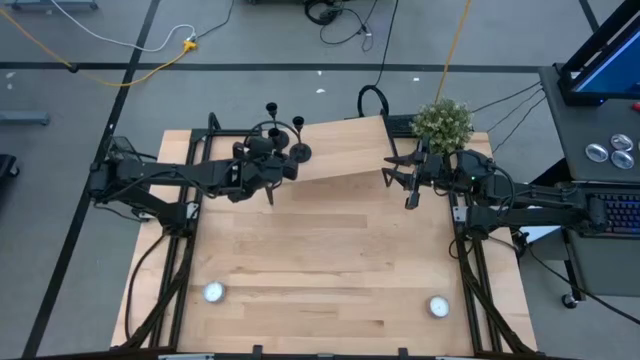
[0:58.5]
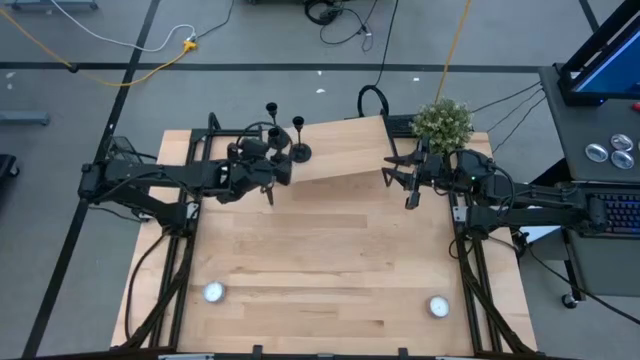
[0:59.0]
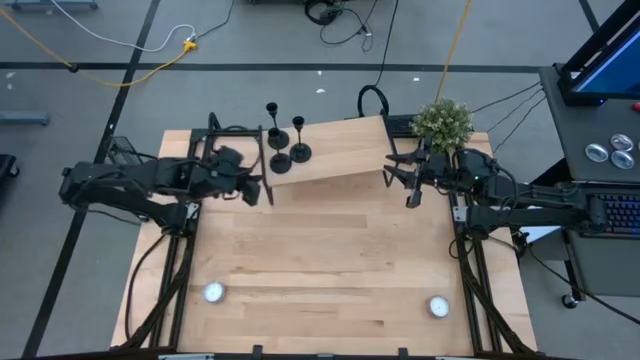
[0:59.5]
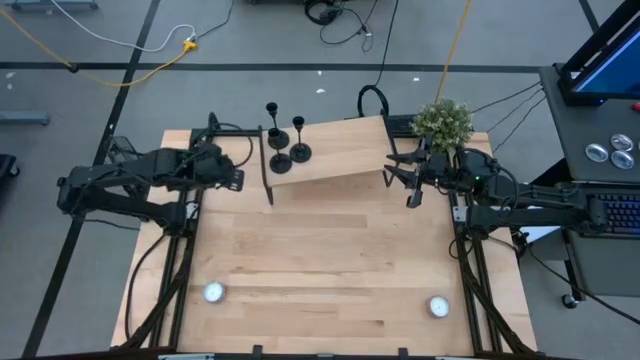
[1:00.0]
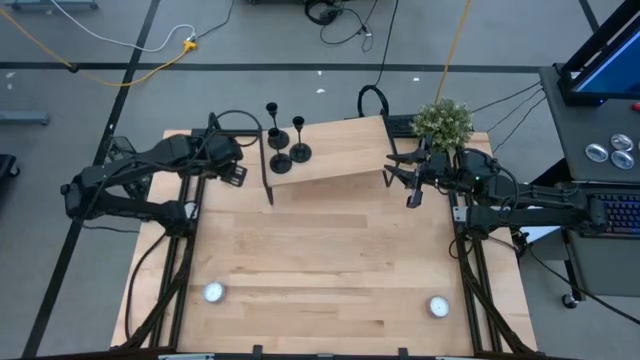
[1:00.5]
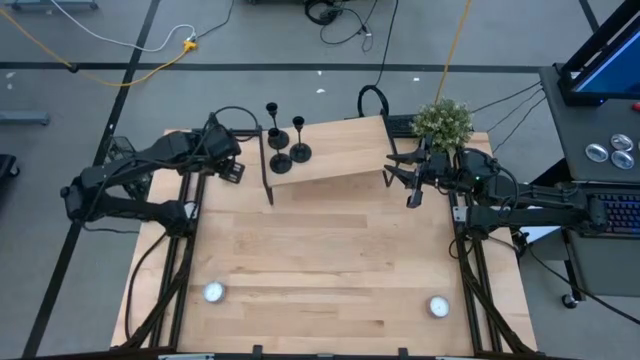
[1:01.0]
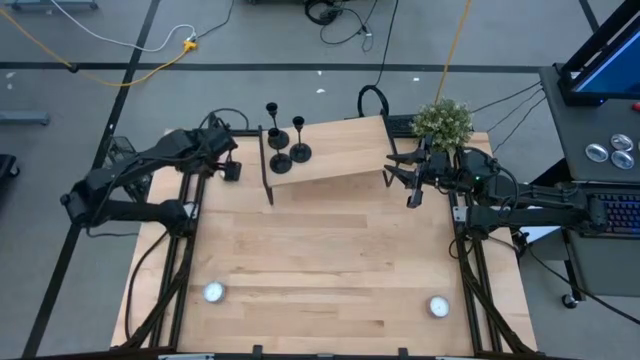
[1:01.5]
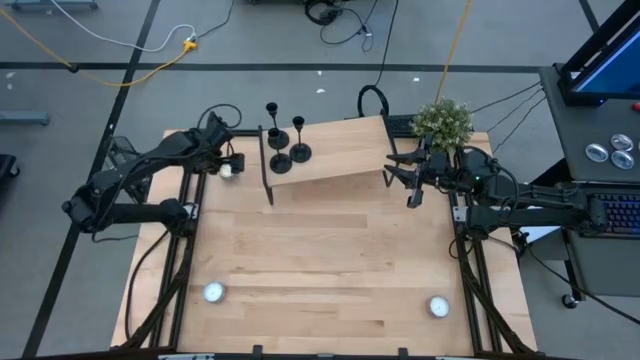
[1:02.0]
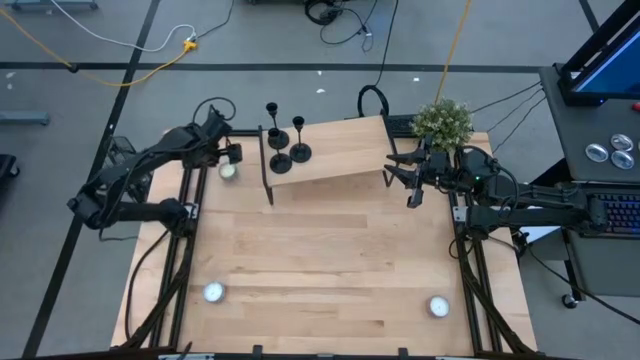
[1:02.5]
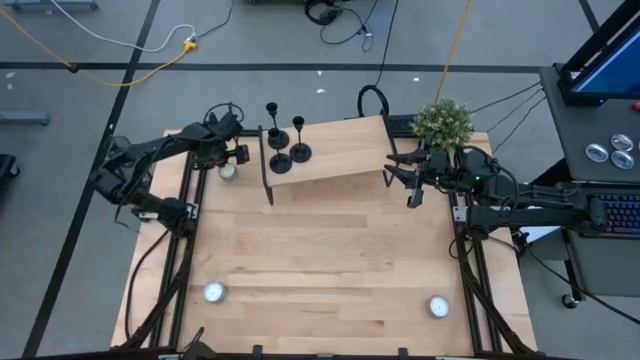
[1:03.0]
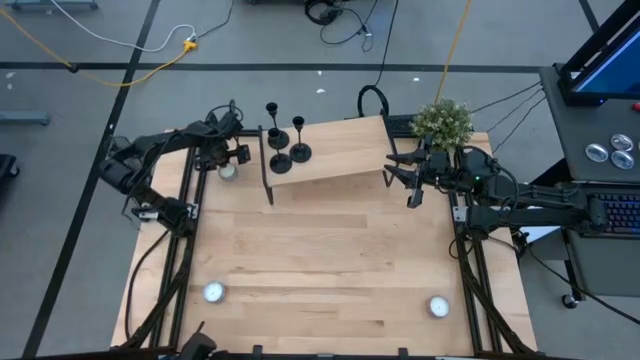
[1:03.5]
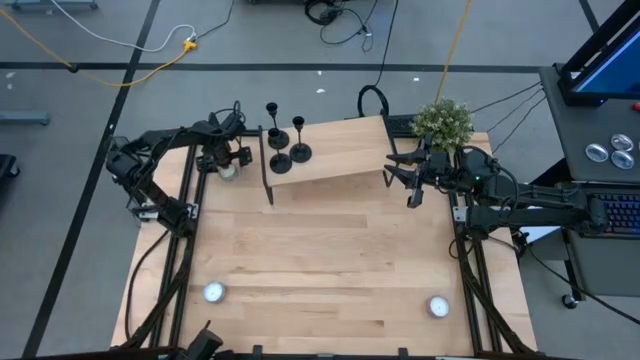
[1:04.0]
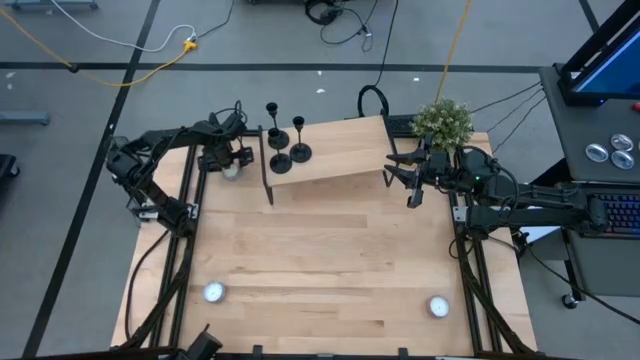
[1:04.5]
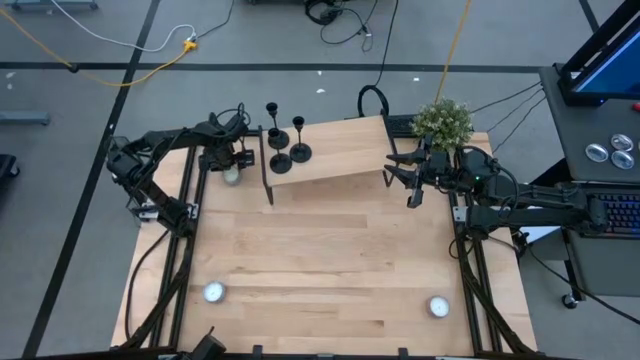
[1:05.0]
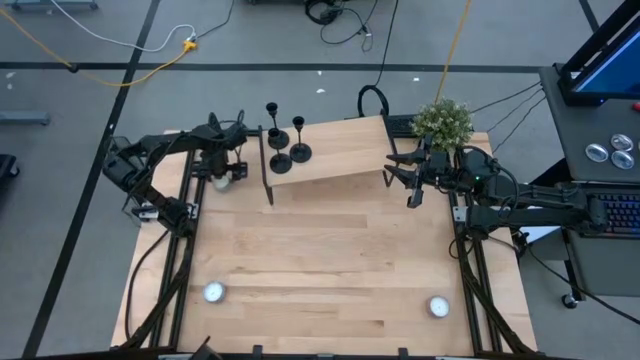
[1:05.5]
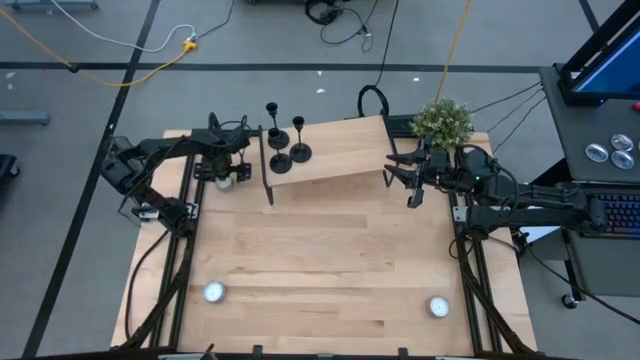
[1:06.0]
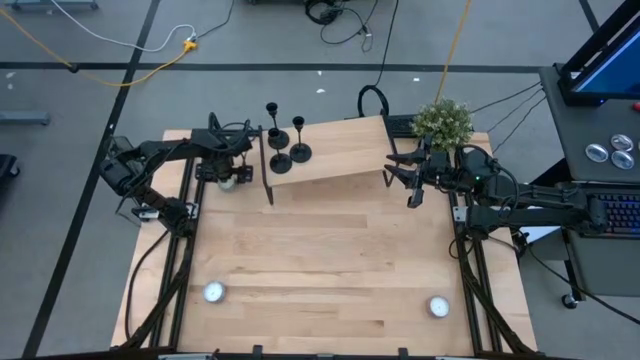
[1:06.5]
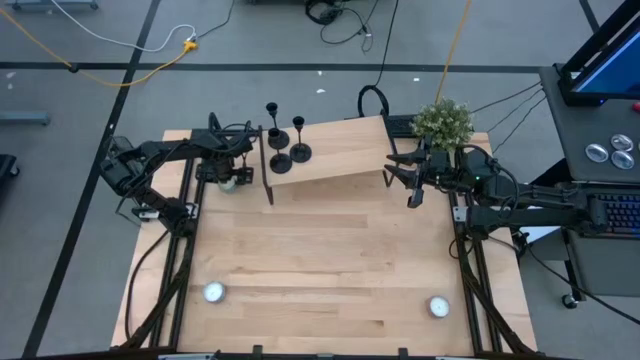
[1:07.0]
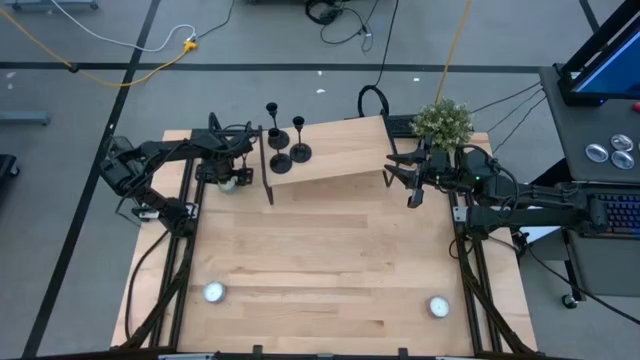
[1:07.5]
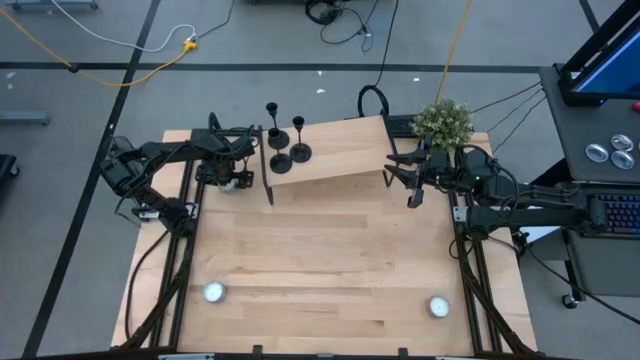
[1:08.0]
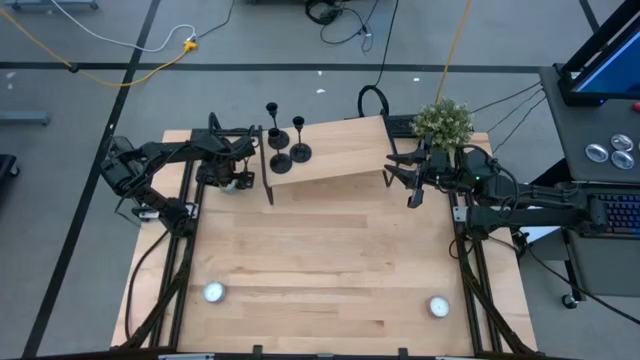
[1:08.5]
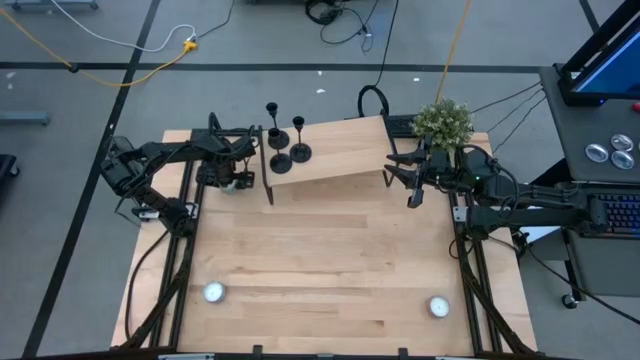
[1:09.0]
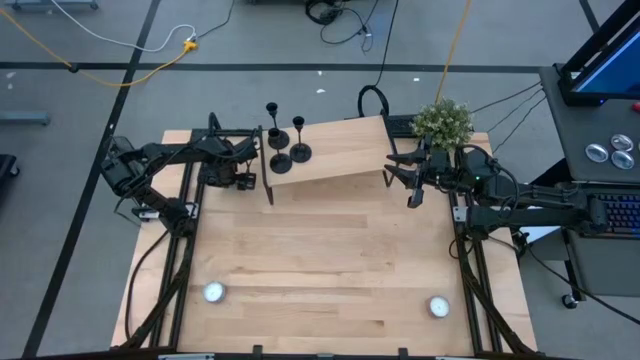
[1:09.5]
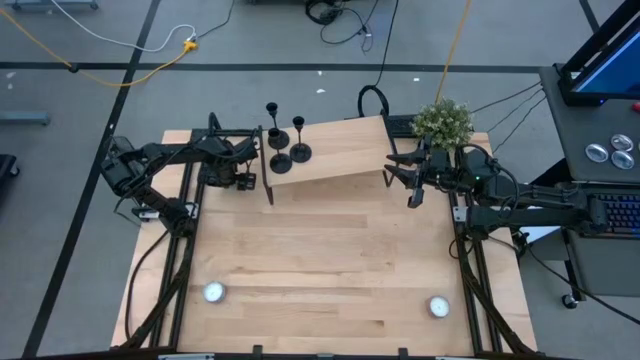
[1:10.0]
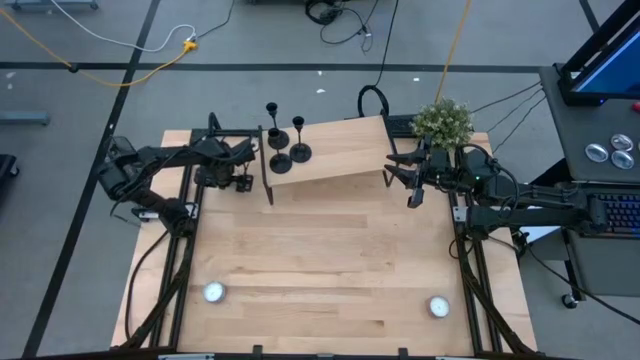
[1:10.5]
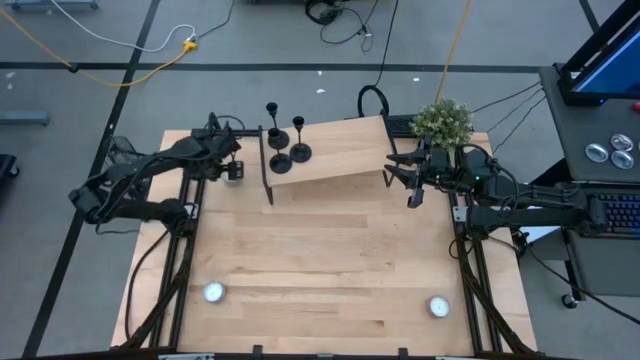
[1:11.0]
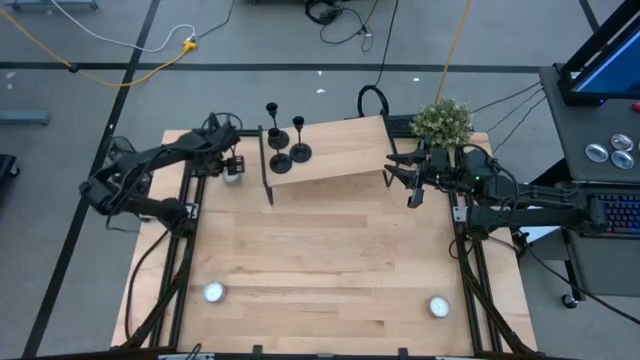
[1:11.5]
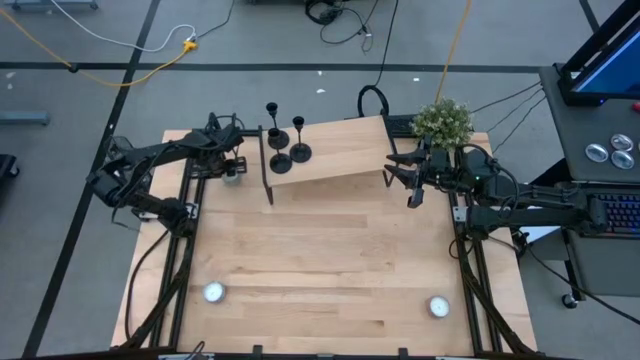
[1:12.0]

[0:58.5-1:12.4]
Task: Pick & Place candle stick holders
Put the top blue scented candle on the shelf

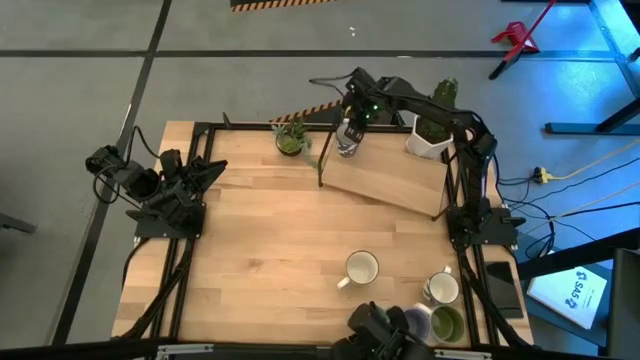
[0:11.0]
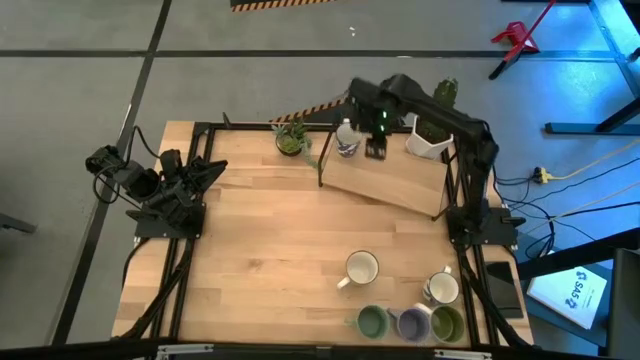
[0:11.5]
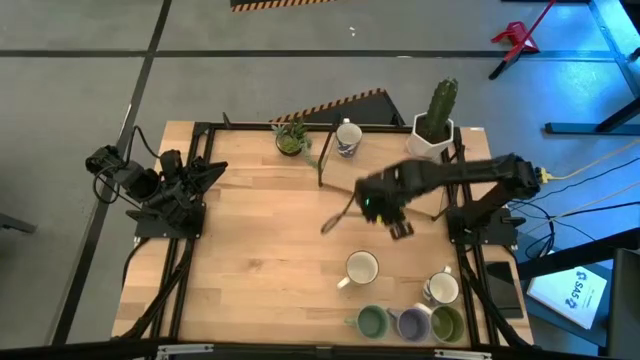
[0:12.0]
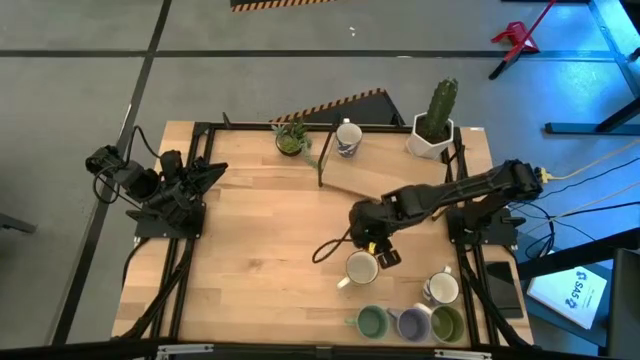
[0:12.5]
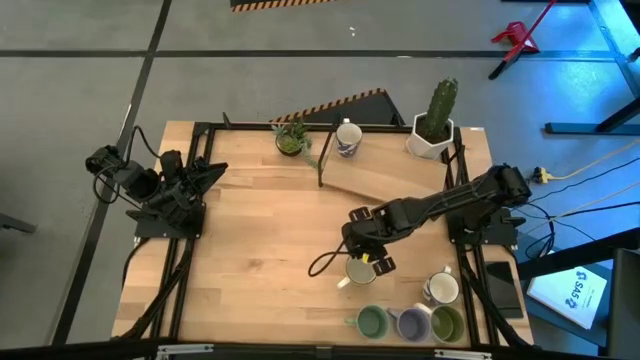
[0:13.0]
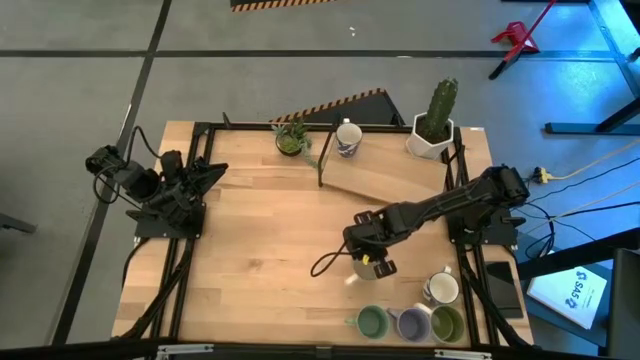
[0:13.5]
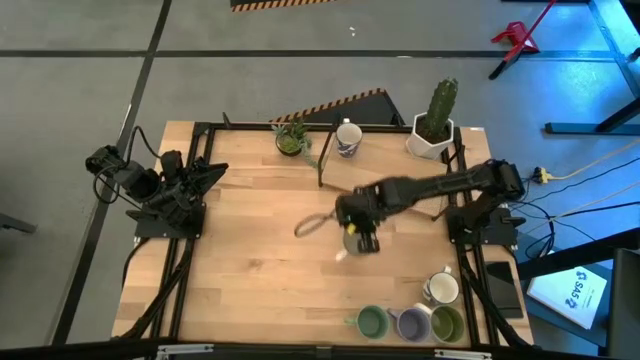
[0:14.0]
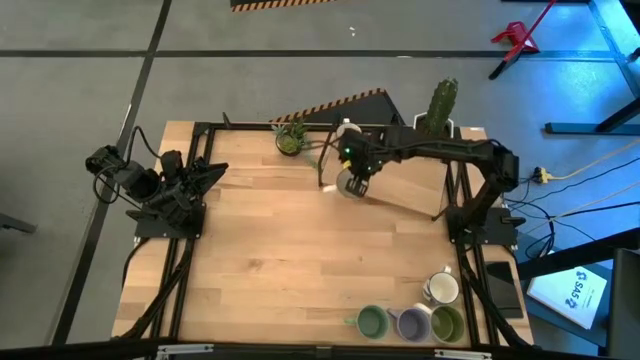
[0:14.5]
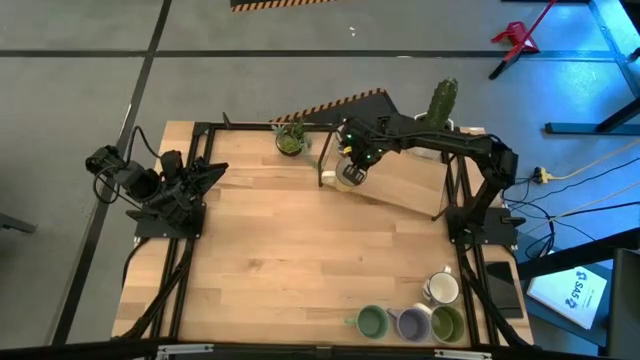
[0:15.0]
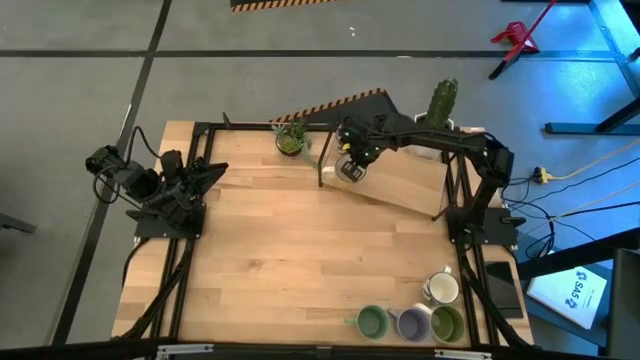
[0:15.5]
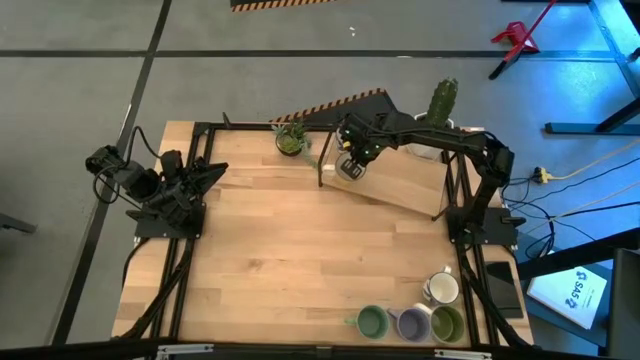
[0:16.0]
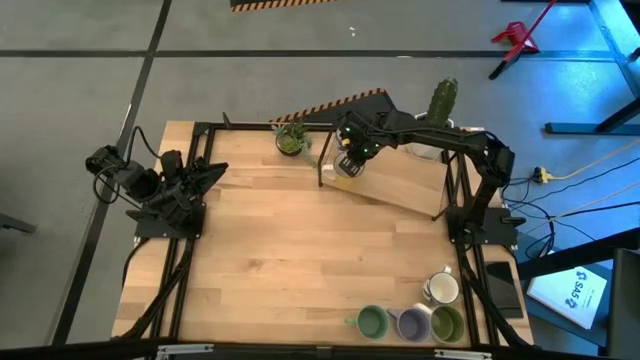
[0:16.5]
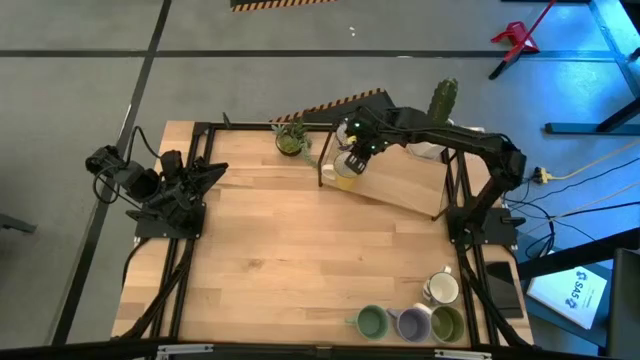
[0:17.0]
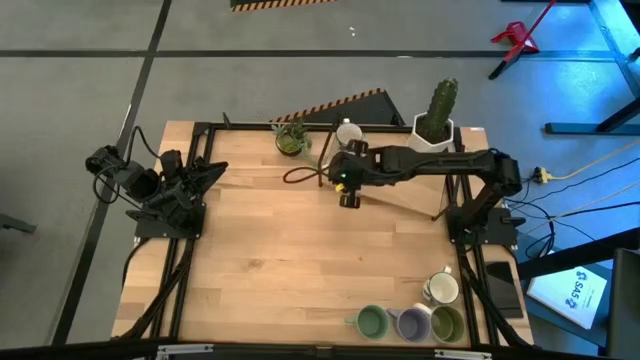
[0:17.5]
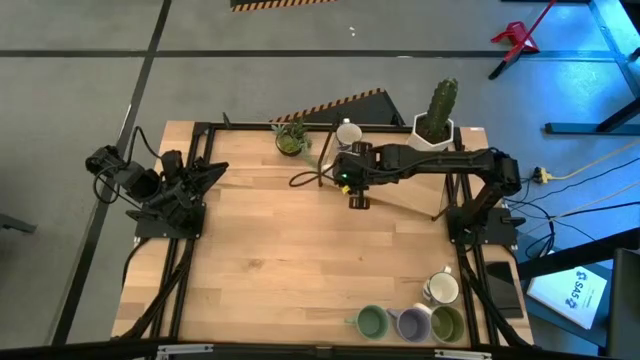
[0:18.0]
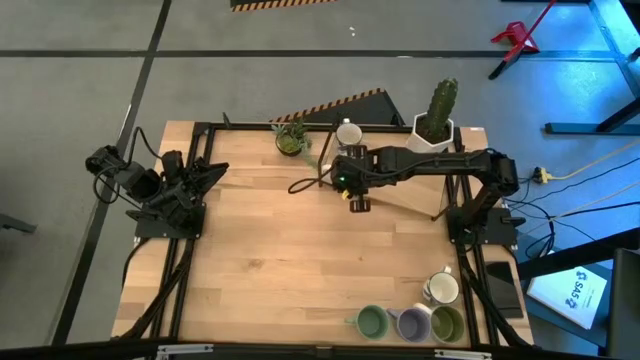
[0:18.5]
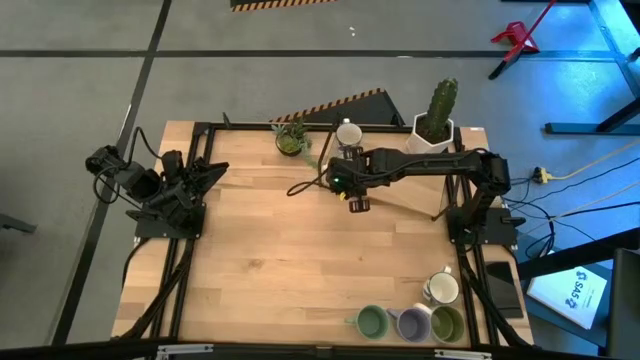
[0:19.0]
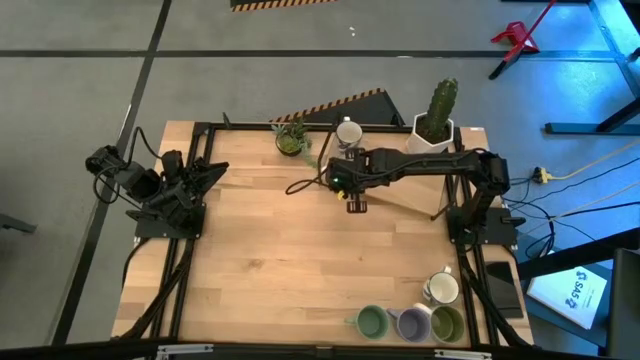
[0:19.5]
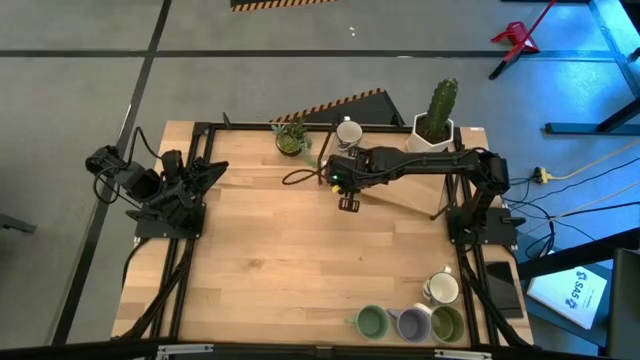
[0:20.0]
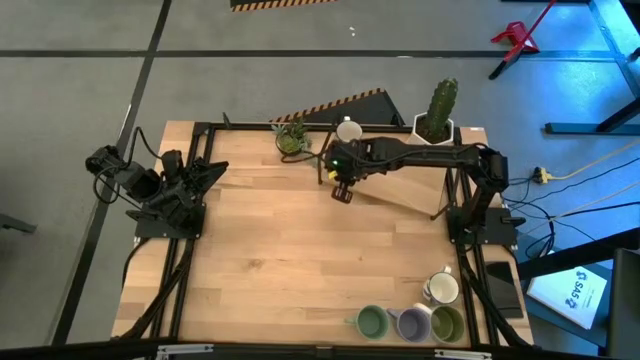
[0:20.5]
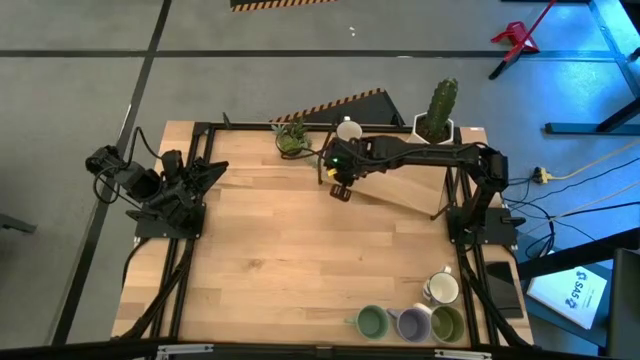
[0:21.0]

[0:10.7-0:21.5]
Task: Place coffee mugs
Put the yellow mug on the shelf
